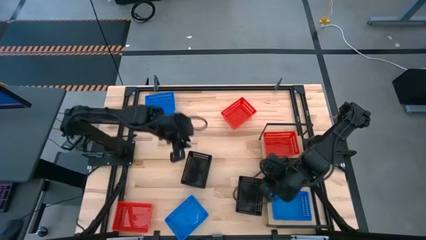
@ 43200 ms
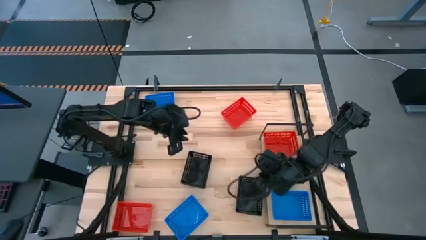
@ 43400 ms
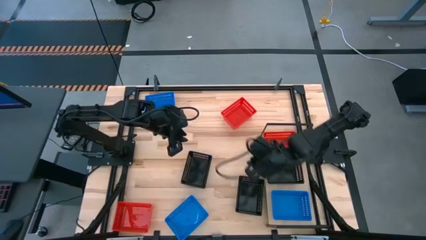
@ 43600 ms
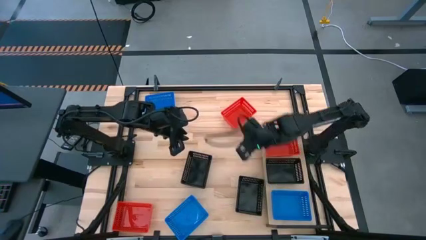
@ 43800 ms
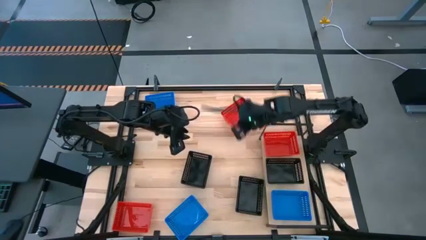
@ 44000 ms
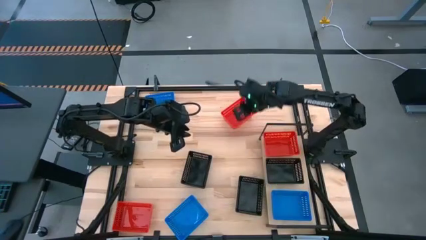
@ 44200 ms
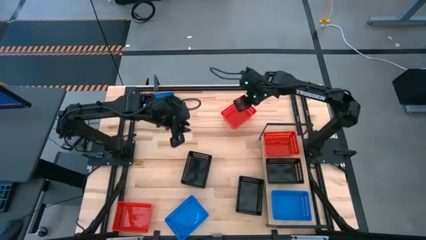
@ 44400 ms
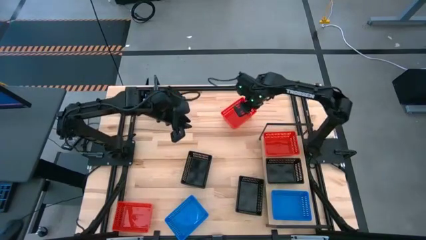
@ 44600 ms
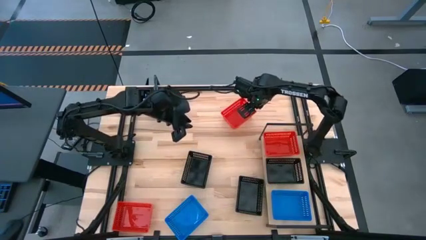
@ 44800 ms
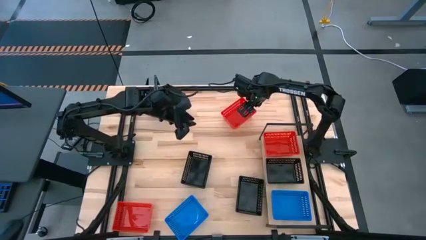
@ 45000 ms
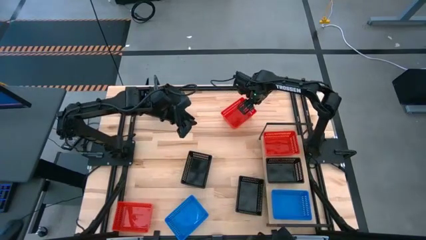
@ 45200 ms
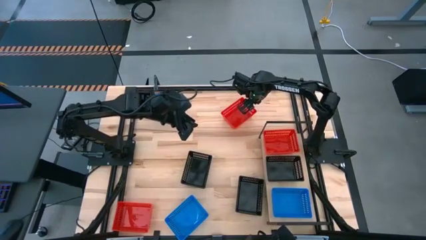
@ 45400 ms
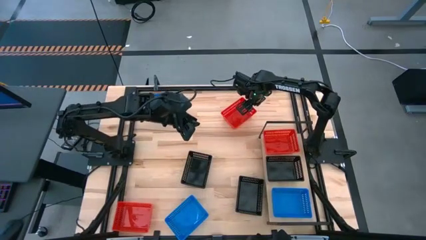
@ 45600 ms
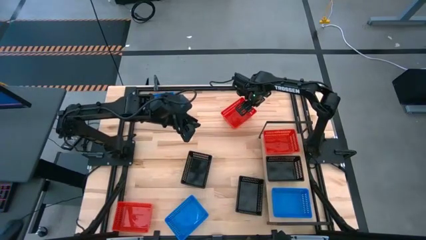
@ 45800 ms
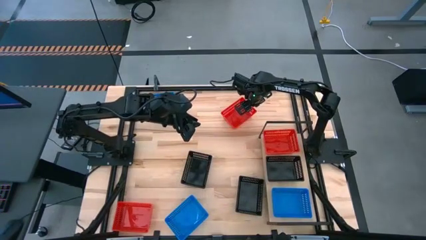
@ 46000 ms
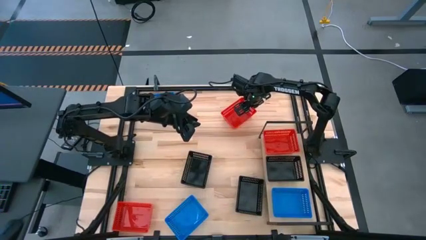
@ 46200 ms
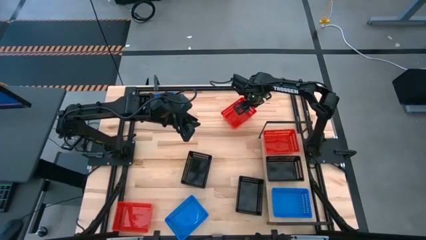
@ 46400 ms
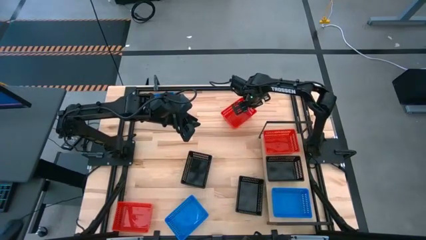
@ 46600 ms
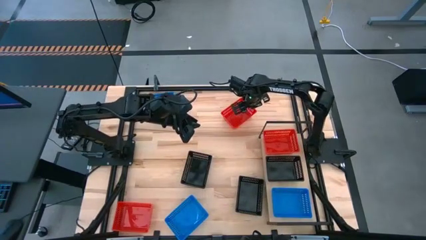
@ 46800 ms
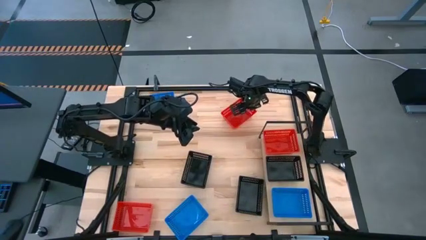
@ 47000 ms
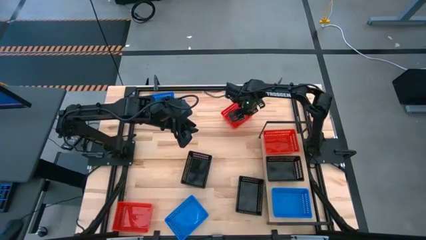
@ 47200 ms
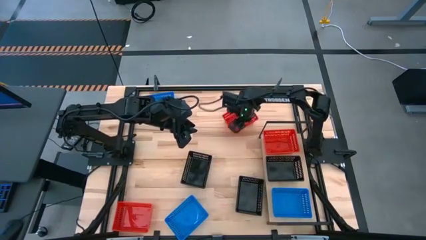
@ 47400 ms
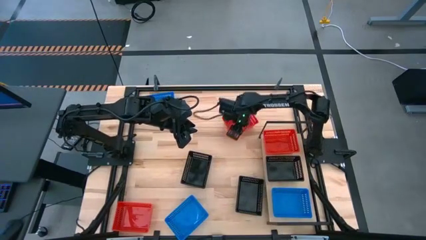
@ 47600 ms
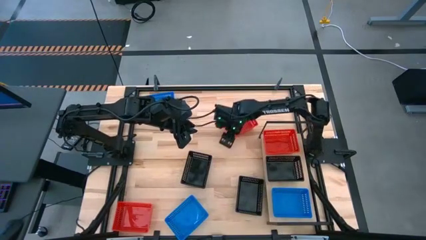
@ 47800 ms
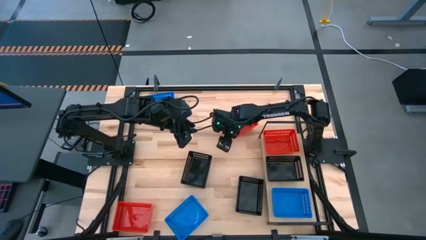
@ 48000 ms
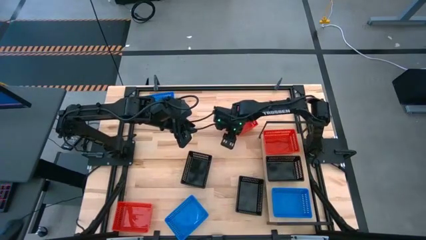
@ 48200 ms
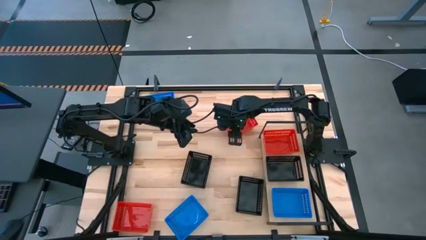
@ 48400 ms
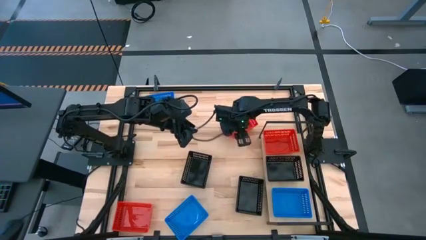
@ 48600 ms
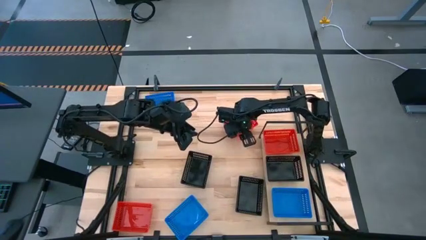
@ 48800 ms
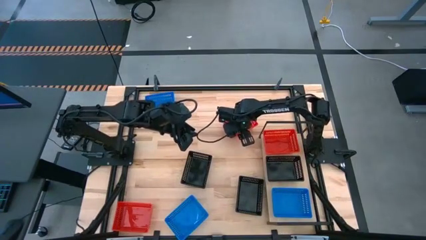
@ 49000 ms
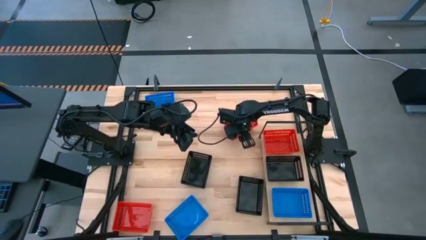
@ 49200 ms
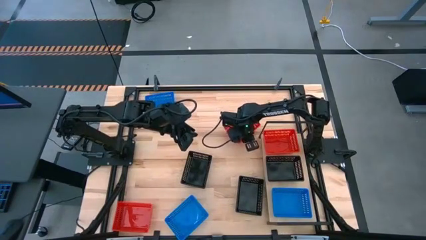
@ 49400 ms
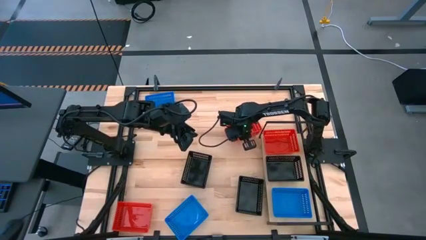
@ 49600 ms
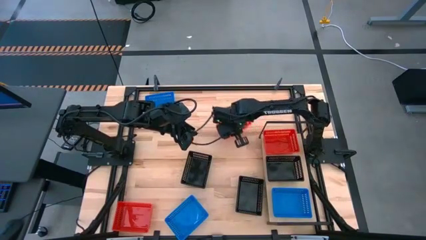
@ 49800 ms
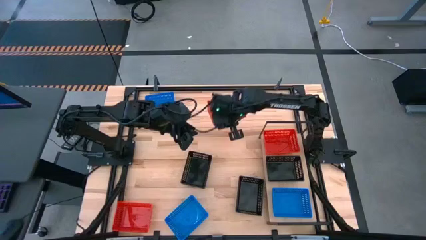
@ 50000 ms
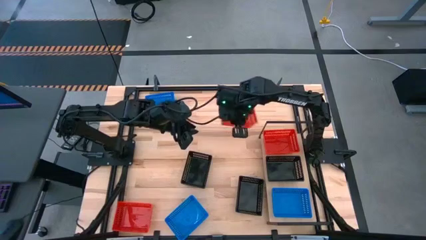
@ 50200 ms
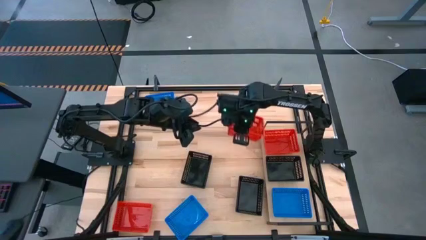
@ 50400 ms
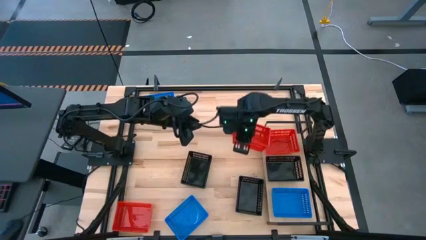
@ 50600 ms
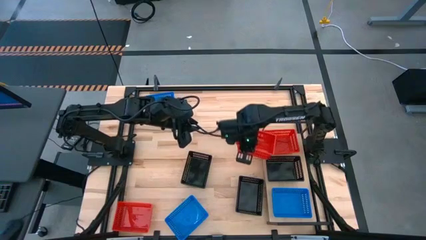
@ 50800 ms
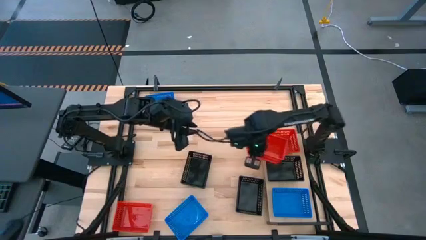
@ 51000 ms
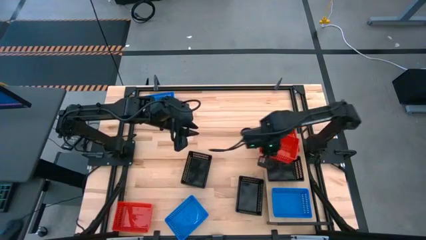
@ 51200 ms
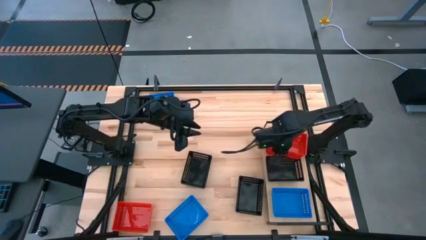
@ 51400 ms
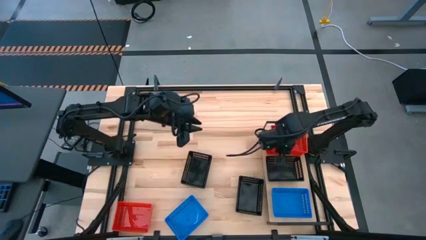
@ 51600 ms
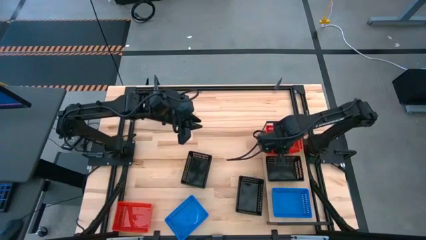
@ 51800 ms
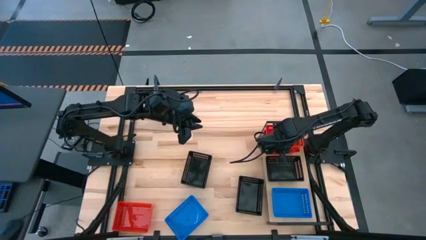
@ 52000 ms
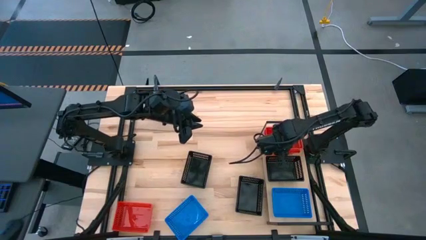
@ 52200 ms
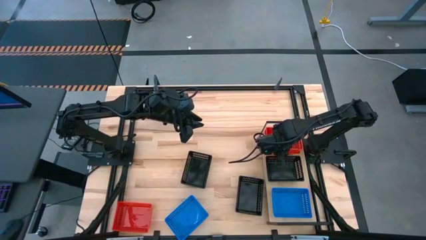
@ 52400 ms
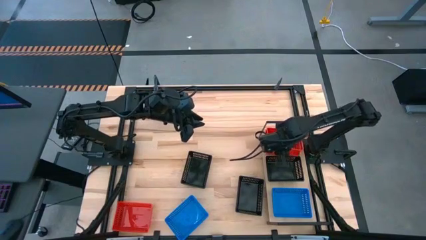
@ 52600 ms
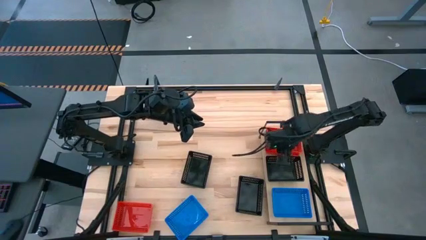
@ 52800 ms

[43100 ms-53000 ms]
Task: Stack baskets on shelf by color
Stack the top red bin on top of the red bin on the shelf

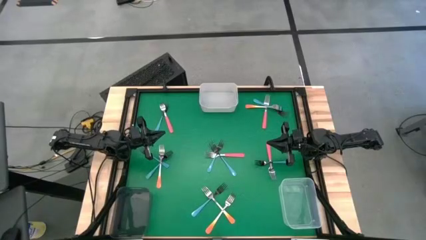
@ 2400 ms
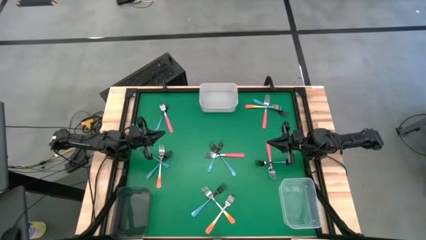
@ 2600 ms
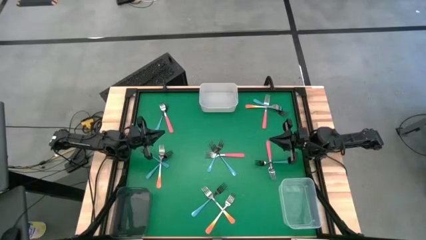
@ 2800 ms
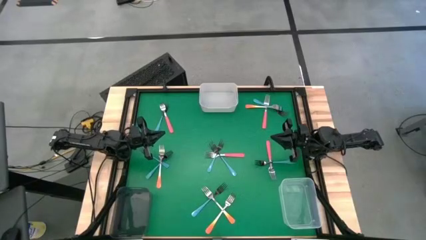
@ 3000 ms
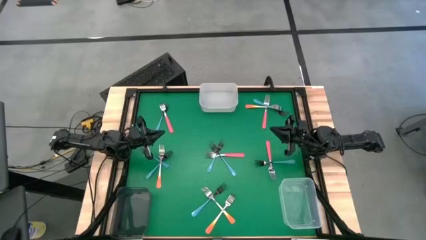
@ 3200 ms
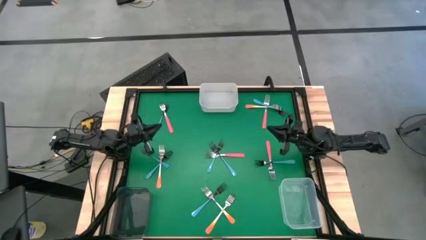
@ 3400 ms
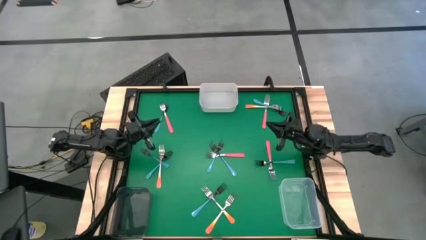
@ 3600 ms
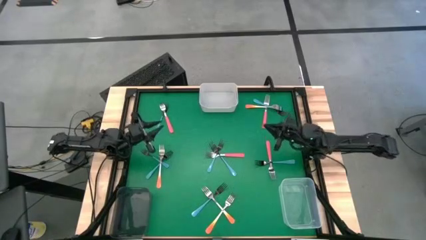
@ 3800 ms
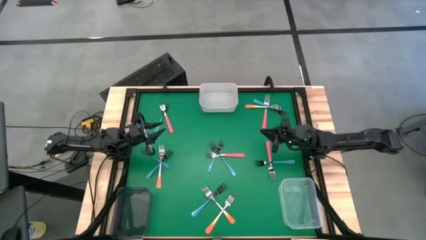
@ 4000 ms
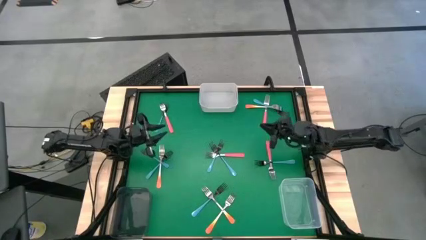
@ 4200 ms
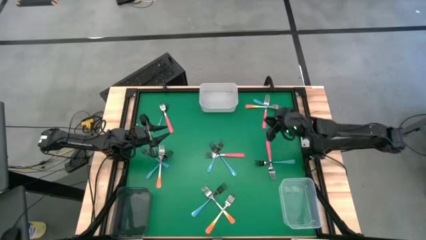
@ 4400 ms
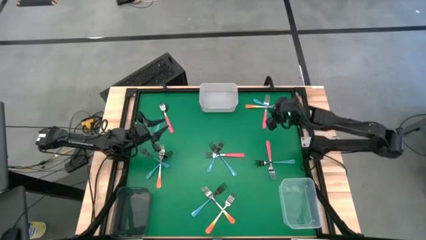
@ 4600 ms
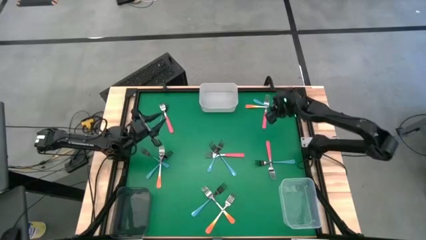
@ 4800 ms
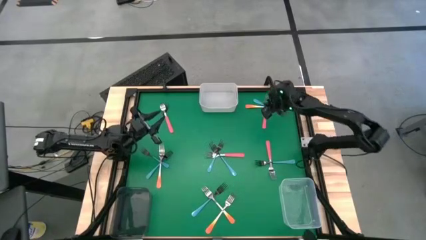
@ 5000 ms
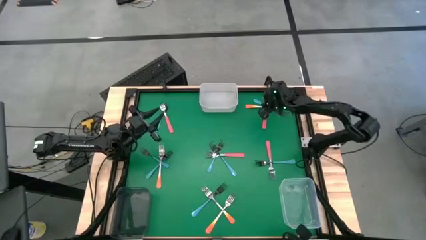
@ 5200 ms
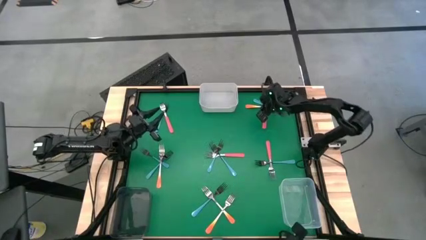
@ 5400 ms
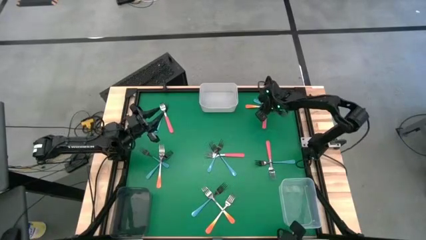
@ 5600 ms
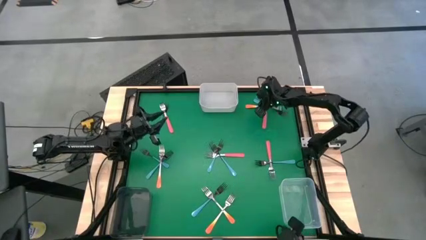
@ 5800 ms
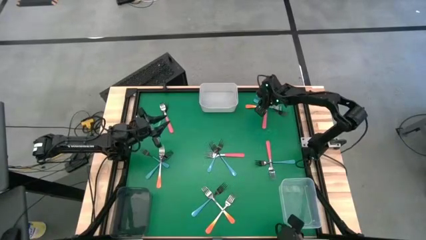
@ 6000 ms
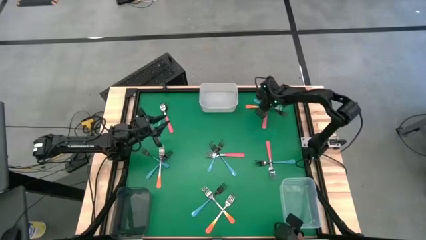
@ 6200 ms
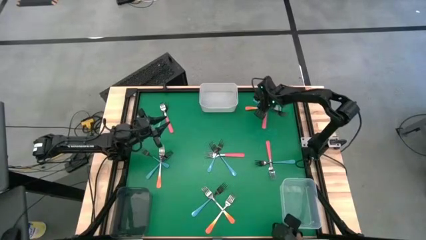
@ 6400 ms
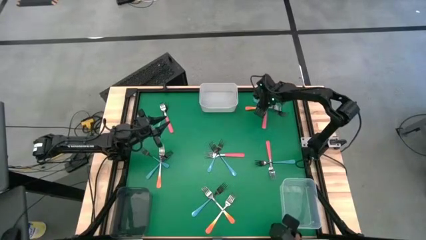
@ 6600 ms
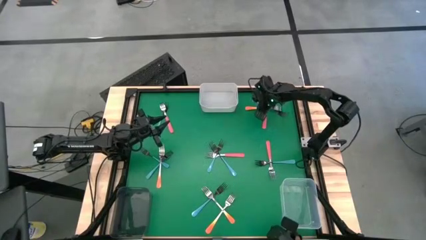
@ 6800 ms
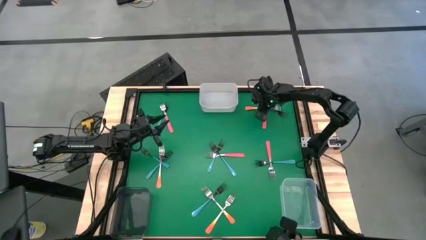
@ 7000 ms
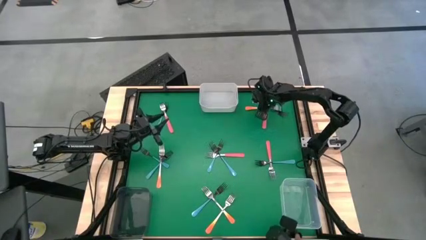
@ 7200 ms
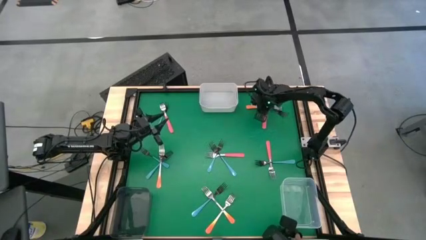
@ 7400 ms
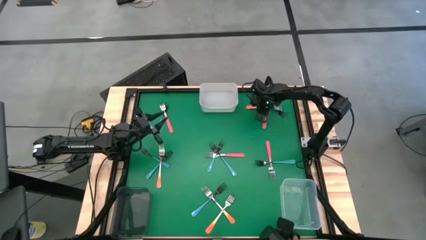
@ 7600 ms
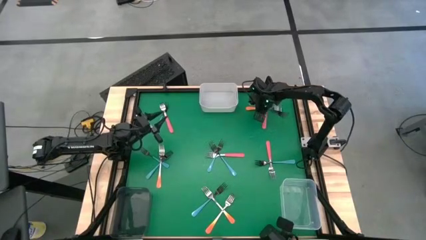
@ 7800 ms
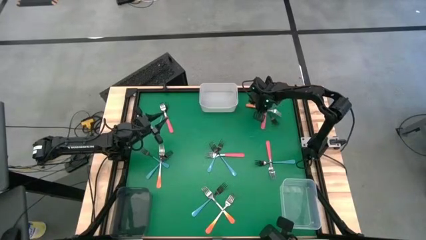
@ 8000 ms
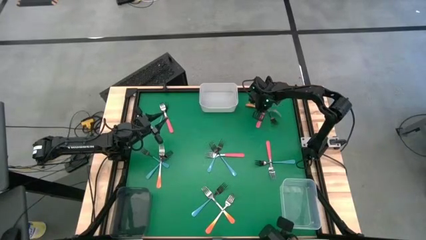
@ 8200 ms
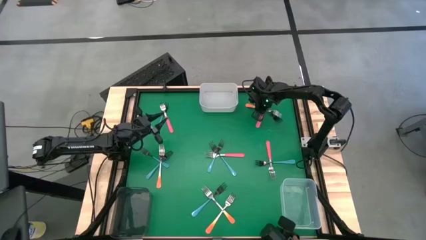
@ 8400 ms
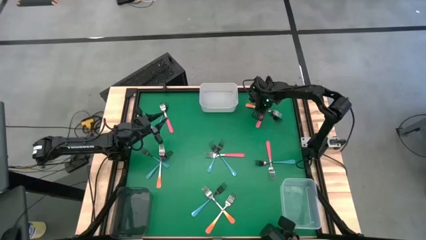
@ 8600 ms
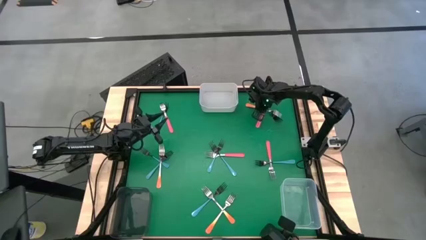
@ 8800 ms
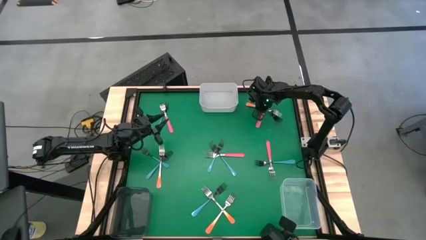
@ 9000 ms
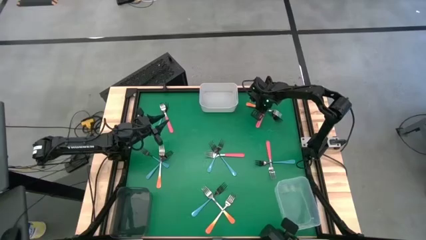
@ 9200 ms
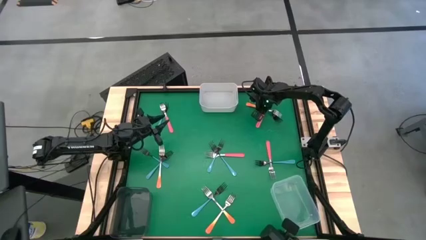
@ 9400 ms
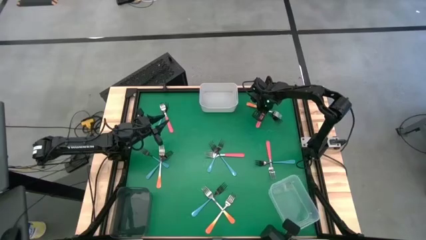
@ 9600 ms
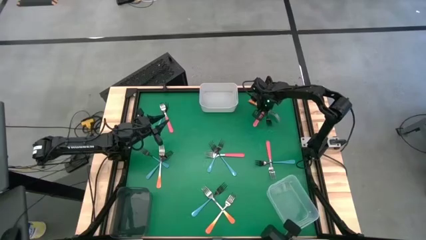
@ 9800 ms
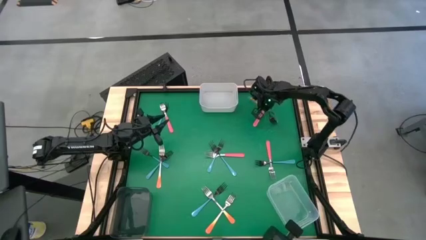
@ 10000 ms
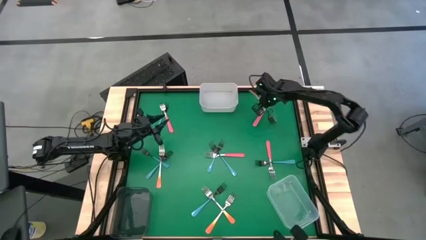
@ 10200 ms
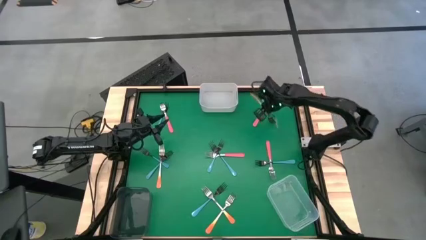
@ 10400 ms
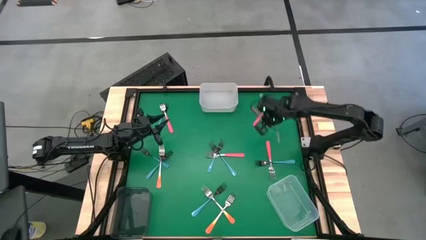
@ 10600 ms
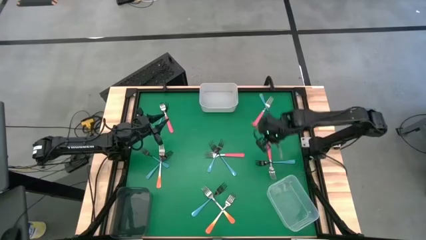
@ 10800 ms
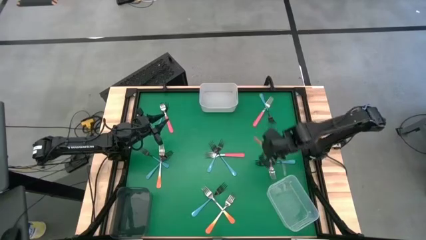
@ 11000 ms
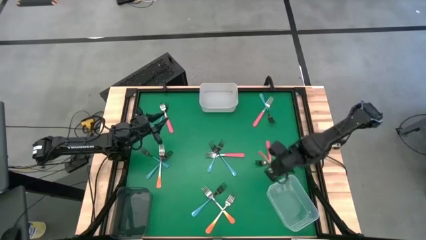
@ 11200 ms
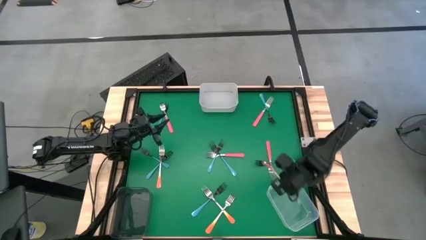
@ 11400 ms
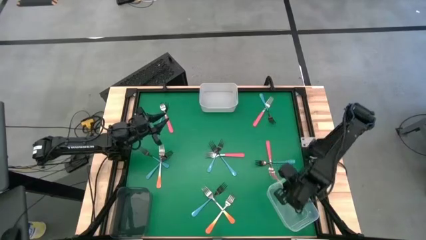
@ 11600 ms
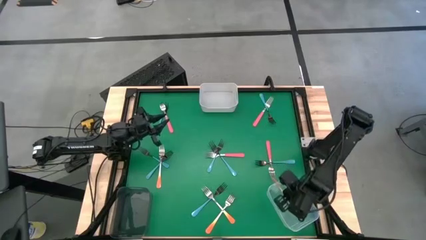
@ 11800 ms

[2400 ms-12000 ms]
Task: Sort silverware by color (type)
Put the top right orange fork into the transparent bin
